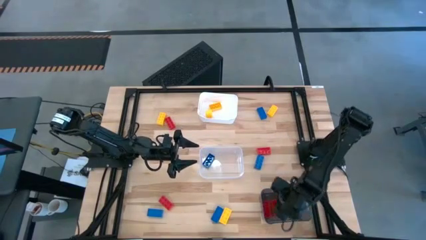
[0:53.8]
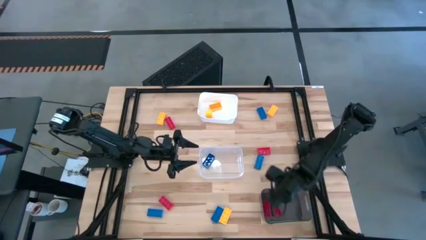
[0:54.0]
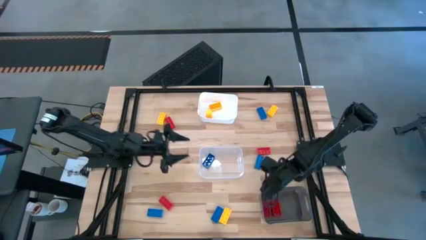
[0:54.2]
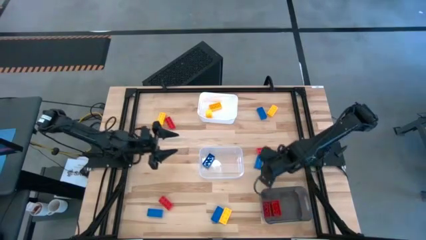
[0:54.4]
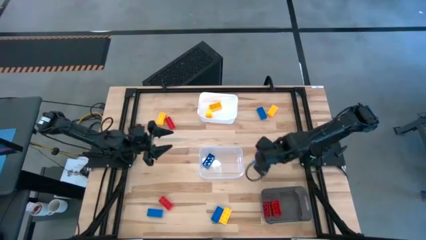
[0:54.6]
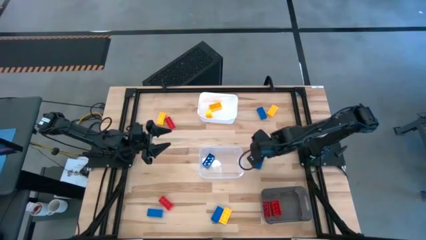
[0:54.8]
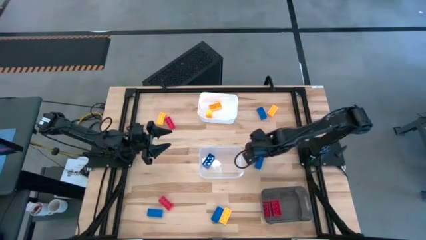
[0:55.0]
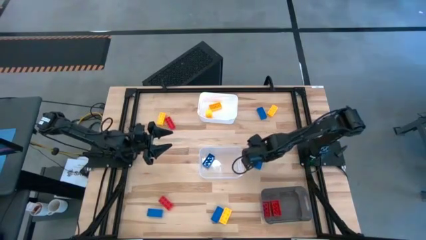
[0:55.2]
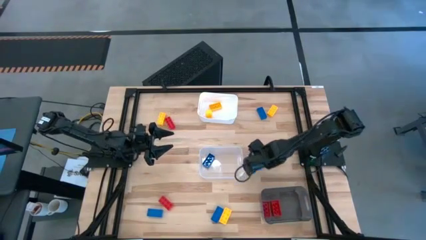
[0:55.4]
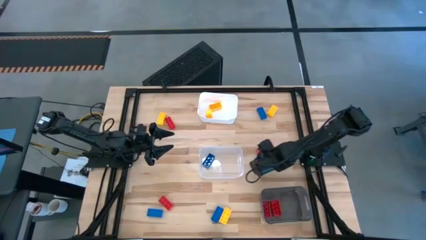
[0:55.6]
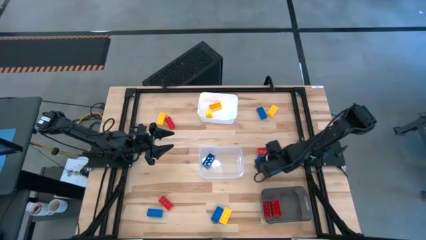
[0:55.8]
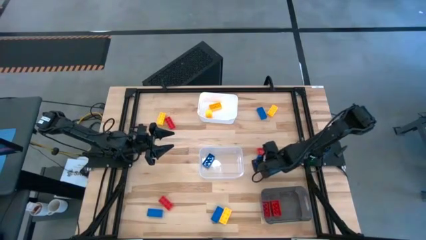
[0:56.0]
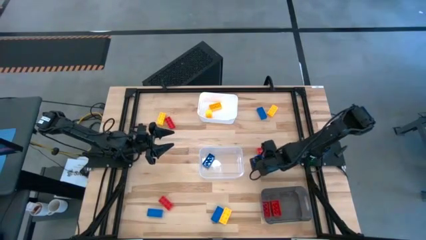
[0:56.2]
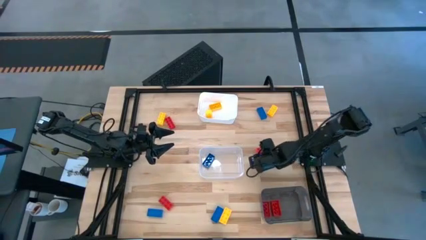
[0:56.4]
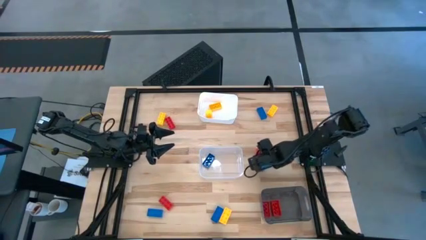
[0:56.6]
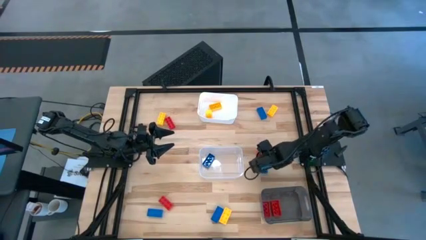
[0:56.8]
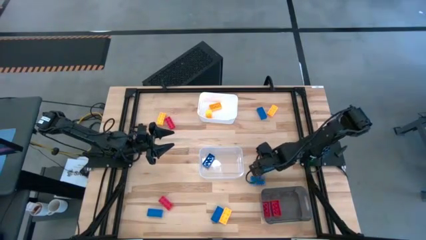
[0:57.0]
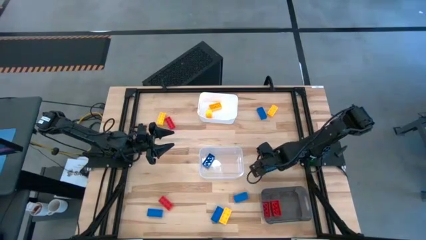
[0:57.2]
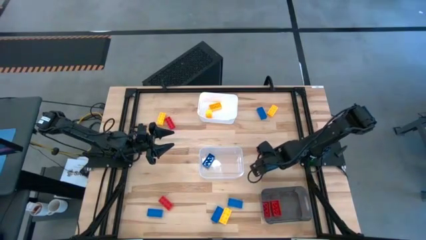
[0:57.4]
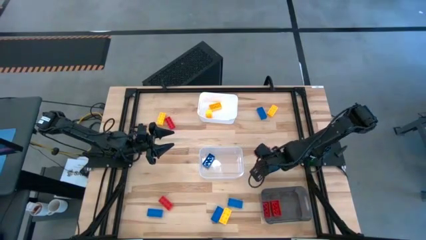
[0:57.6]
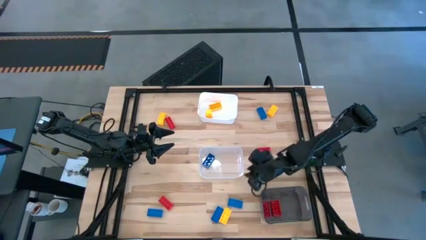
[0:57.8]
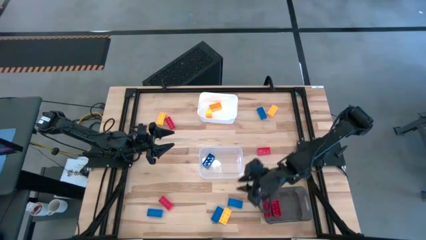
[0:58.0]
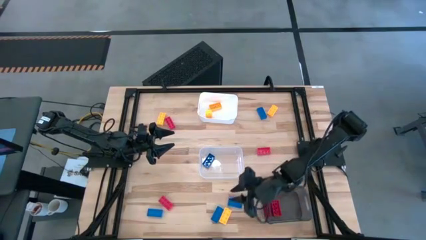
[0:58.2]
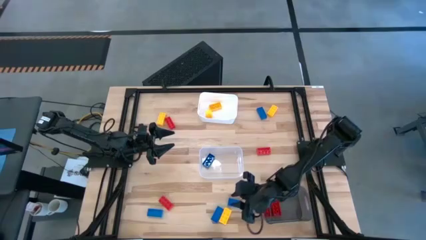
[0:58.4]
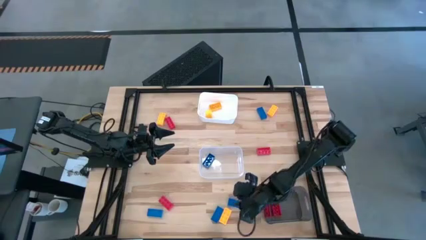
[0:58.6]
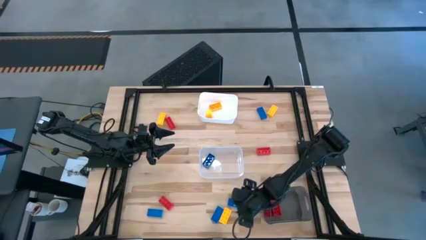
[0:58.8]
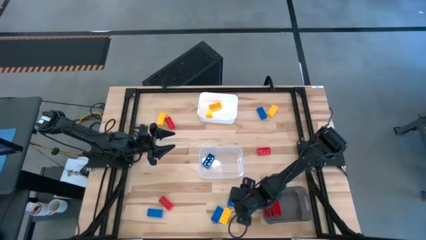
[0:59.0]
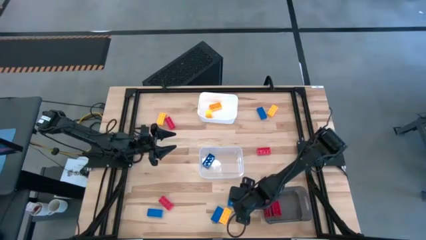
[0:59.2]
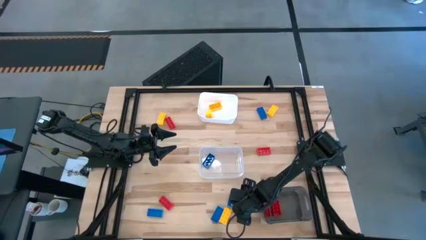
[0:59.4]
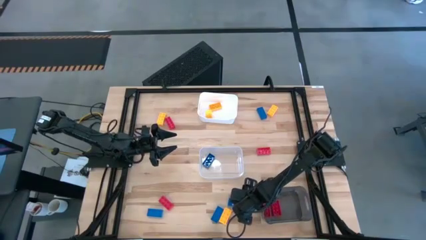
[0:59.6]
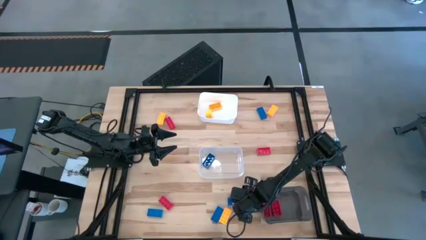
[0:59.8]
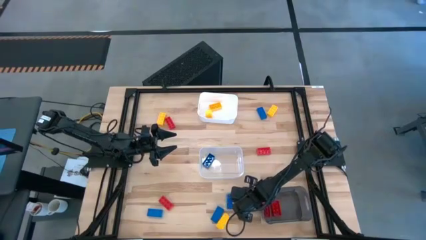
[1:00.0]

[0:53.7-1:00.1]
Task: Sort & place blocks by color
Put the blue game piece into the transparent bin

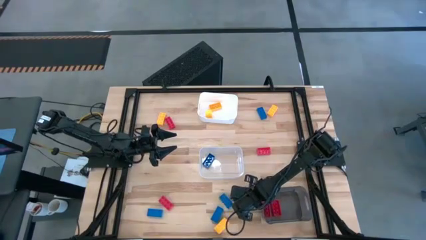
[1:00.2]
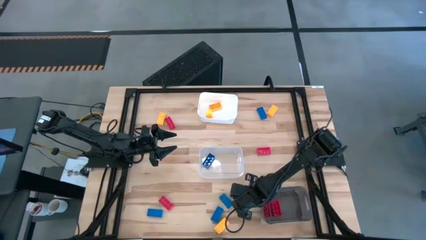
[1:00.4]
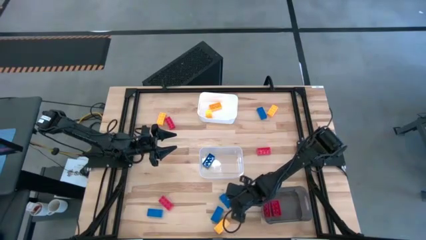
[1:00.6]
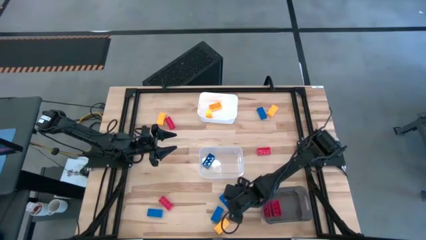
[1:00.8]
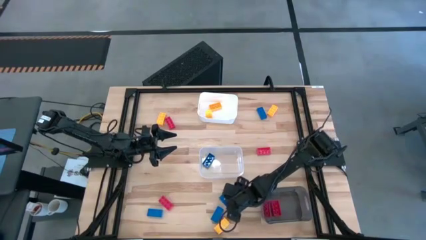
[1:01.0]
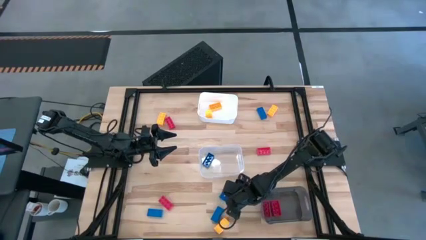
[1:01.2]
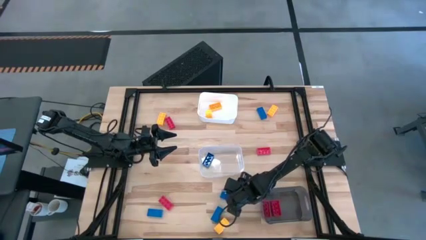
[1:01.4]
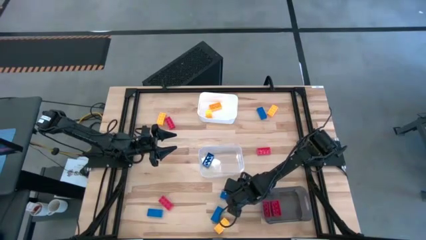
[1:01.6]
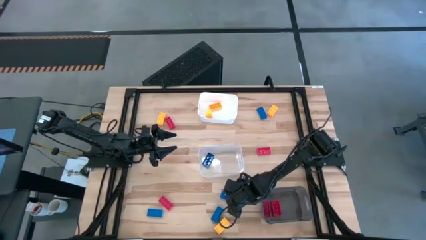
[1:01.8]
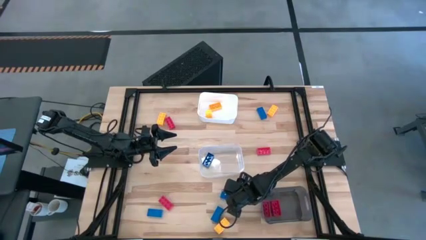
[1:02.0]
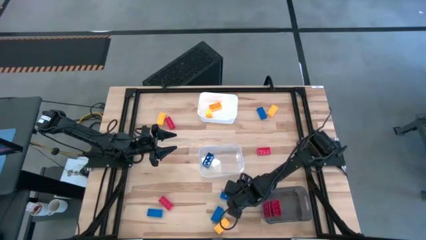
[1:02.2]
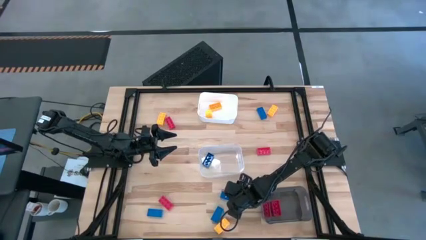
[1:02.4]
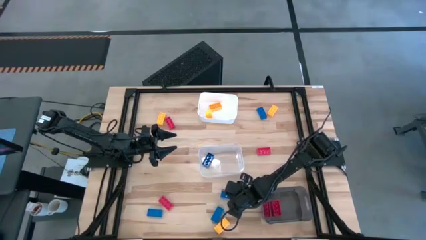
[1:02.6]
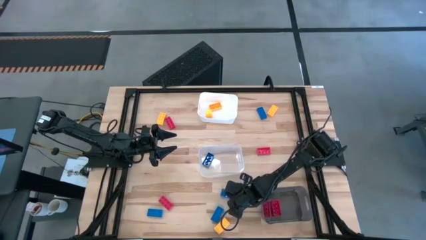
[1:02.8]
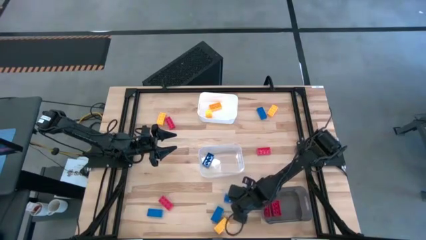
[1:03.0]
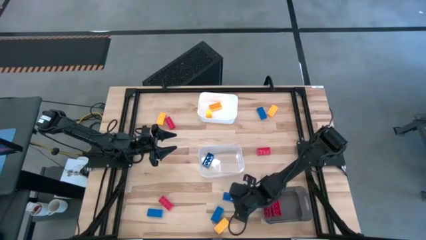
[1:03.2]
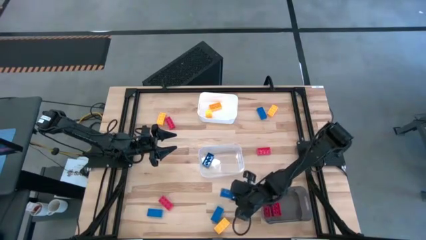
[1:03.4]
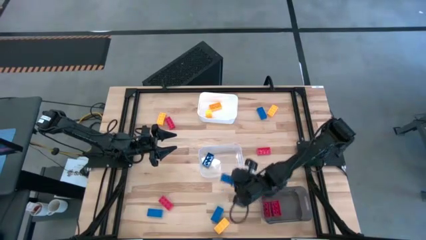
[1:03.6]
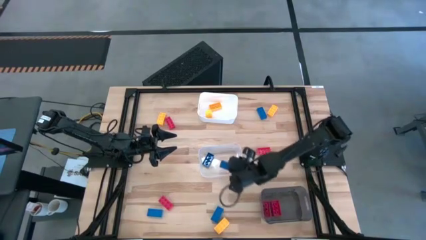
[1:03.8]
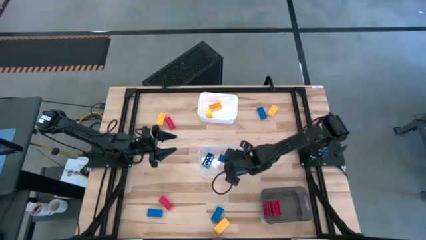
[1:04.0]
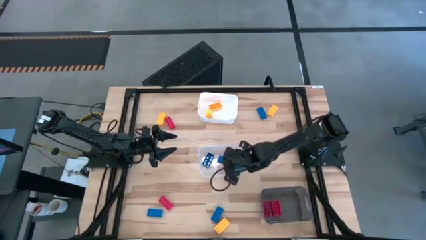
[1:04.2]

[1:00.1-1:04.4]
Put the blue game piece into the transparent bin

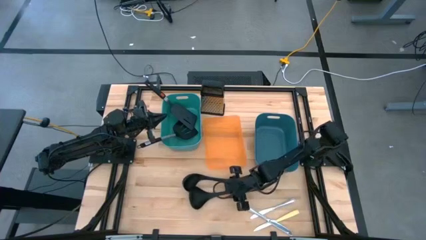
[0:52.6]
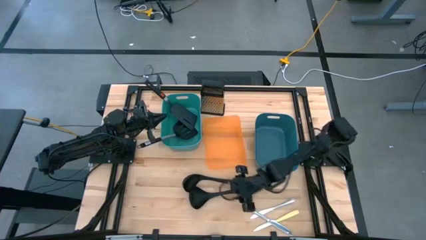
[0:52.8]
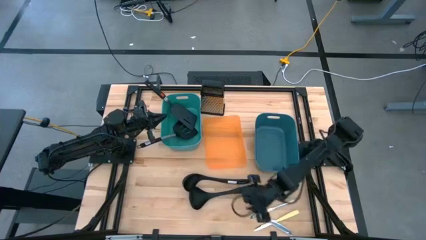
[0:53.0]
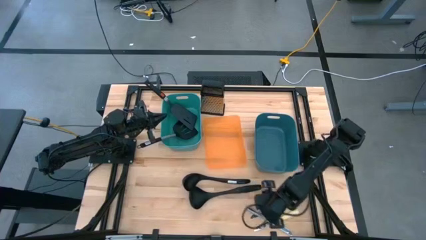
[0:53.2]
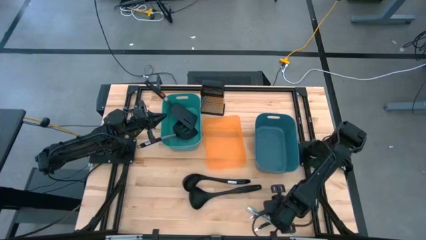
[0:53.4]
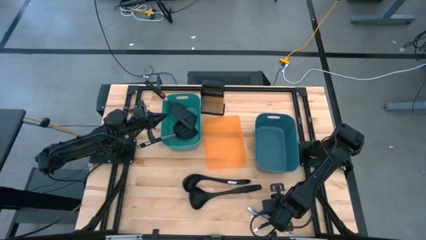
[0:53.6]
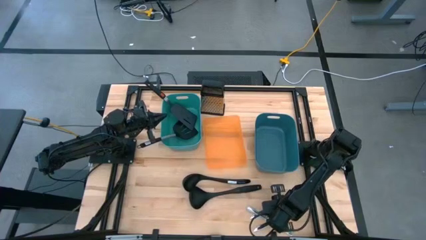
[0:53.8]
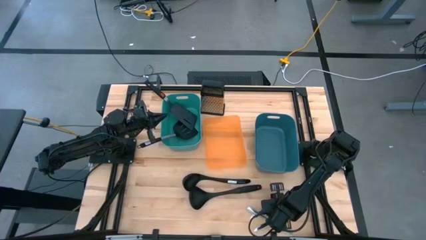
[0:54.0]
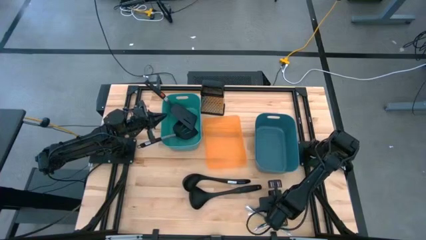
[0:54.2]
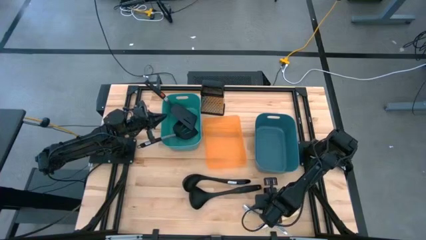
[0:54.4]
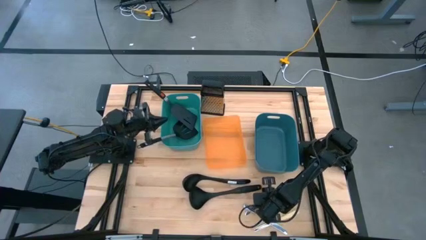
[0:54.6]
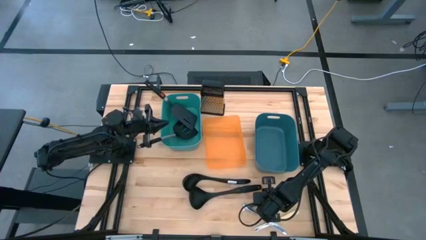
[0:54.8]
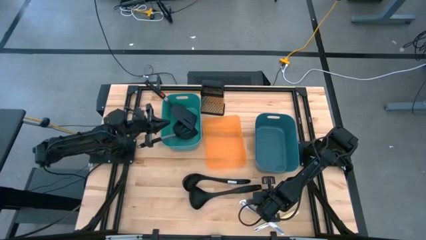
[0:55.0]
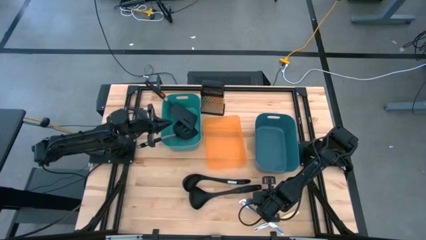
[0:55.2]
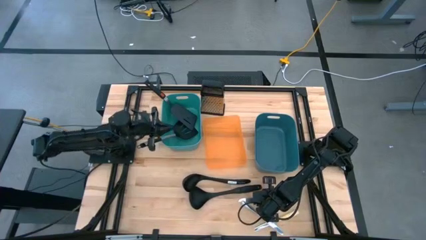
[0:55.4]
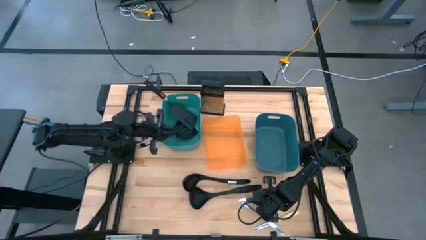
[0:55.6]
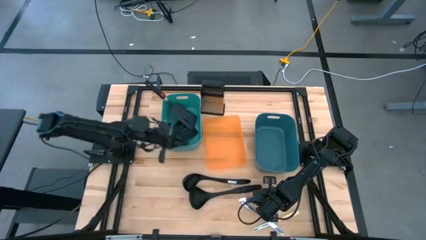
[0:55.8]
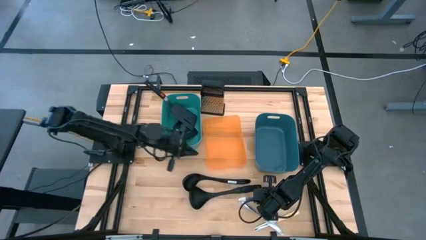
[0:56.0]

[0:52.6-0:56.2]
Task: Pick & Place Kitchen Items
Adjust the top silver table knife
